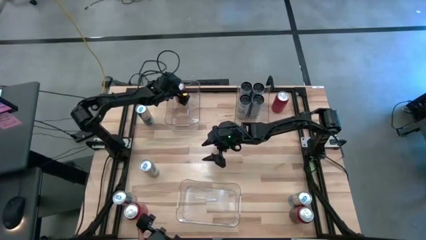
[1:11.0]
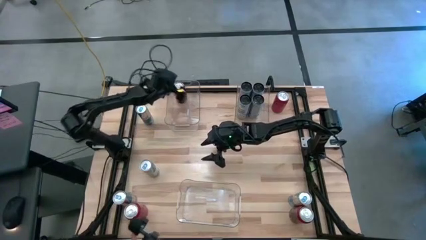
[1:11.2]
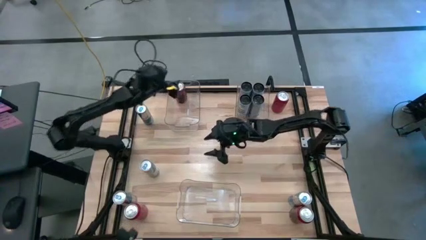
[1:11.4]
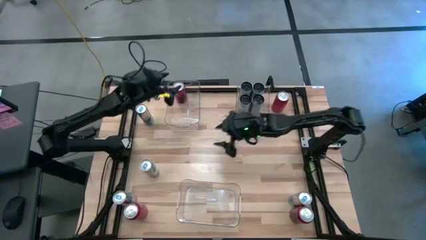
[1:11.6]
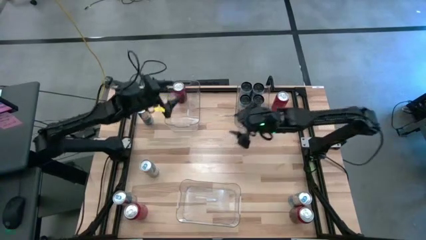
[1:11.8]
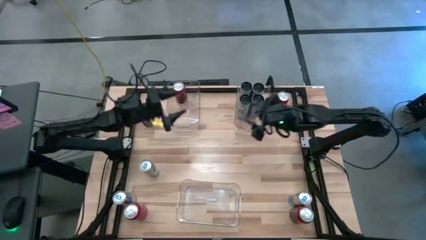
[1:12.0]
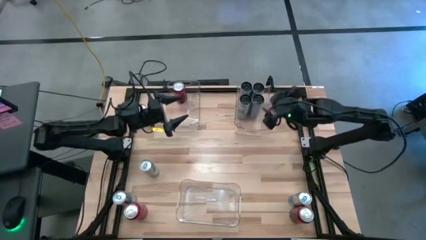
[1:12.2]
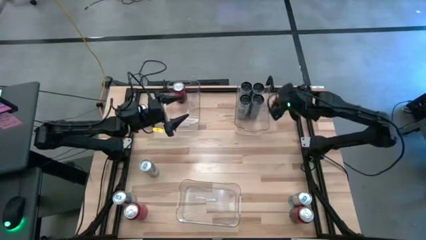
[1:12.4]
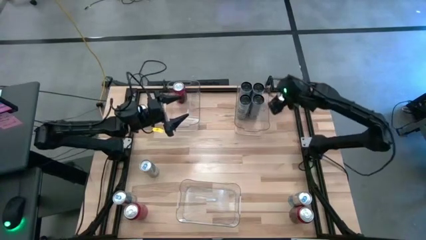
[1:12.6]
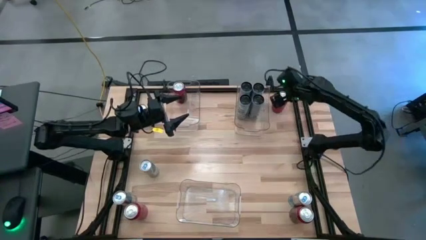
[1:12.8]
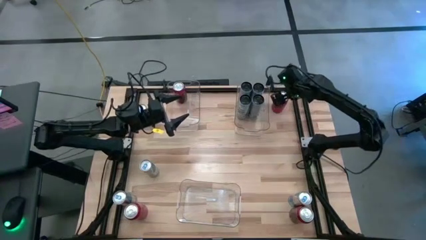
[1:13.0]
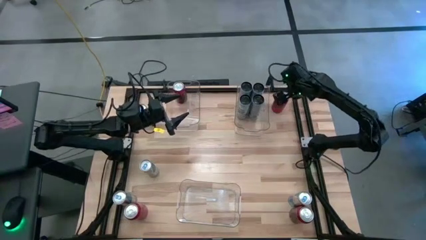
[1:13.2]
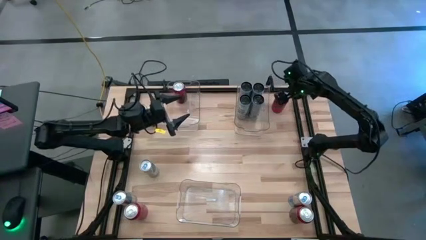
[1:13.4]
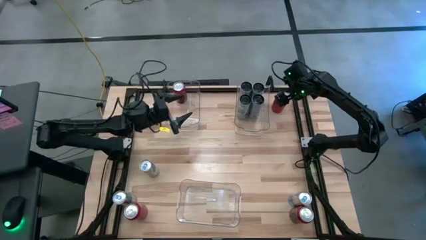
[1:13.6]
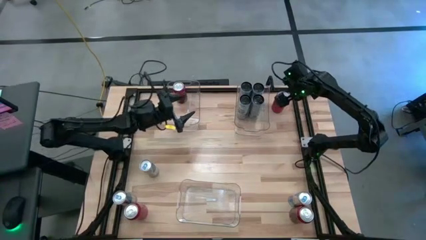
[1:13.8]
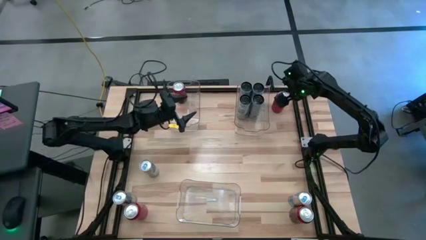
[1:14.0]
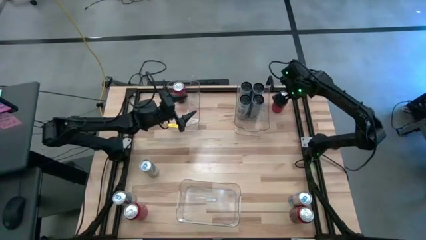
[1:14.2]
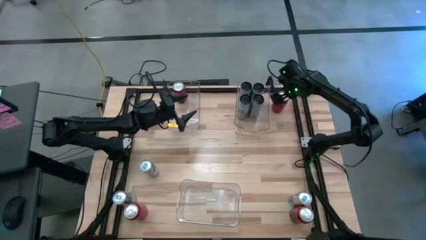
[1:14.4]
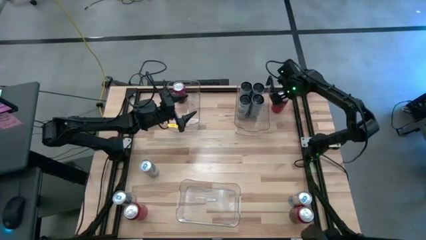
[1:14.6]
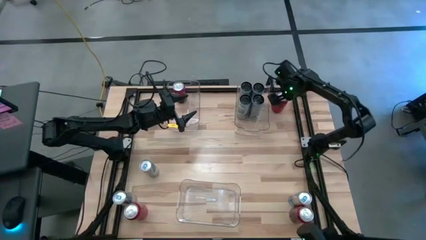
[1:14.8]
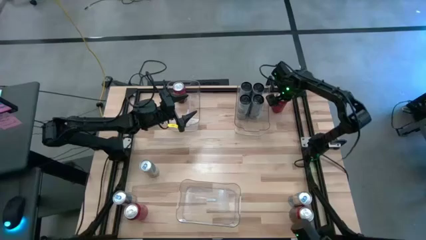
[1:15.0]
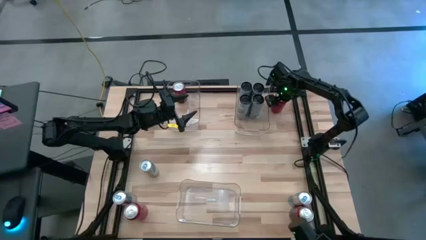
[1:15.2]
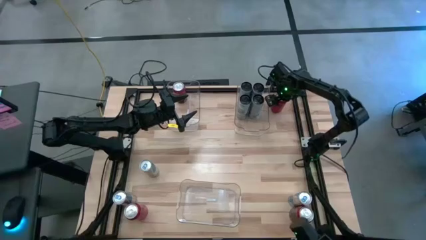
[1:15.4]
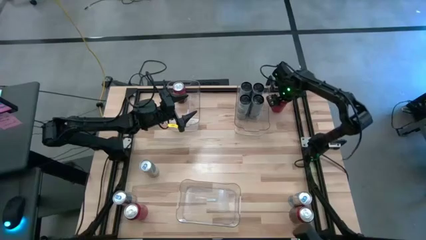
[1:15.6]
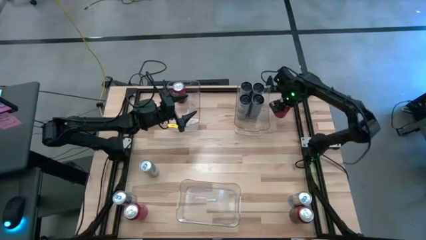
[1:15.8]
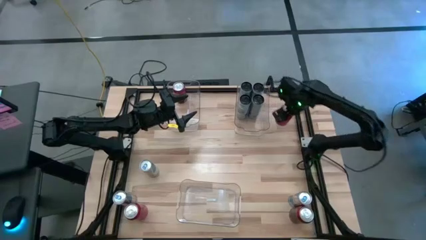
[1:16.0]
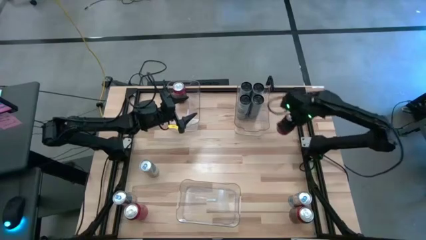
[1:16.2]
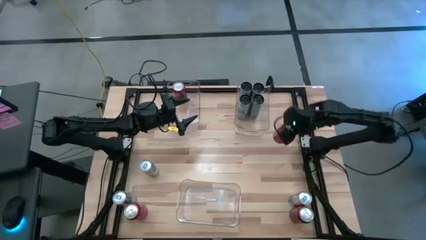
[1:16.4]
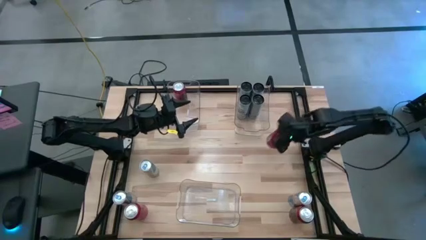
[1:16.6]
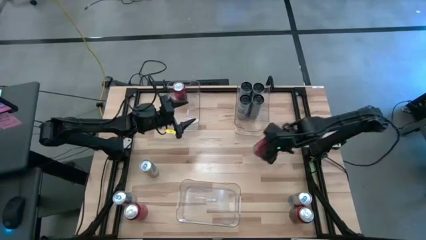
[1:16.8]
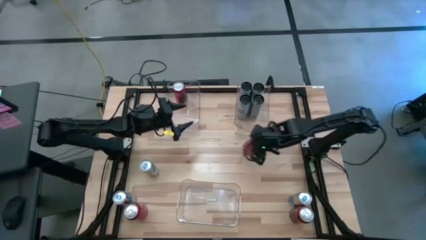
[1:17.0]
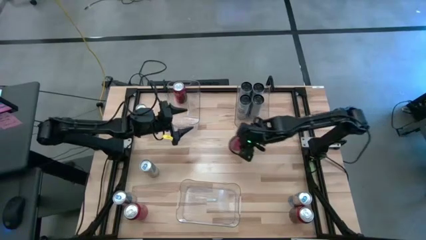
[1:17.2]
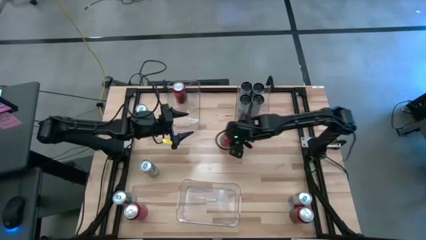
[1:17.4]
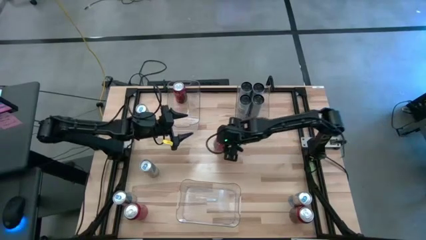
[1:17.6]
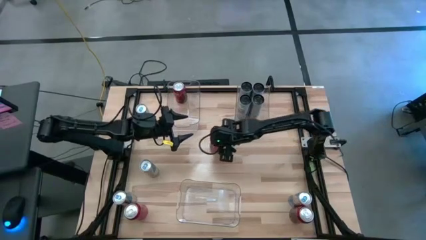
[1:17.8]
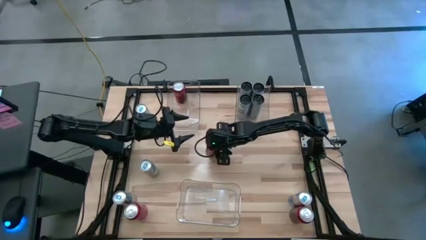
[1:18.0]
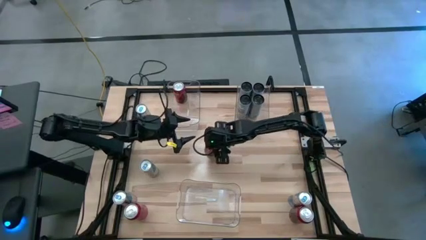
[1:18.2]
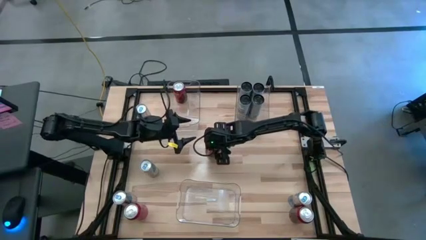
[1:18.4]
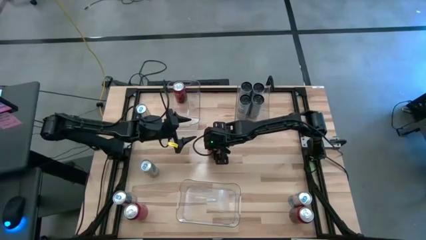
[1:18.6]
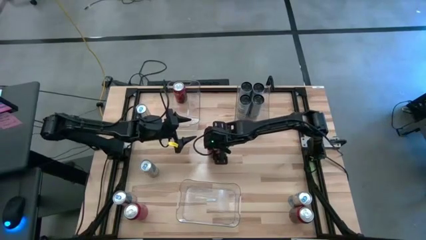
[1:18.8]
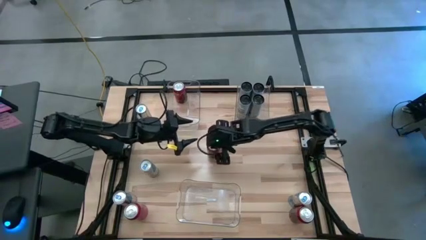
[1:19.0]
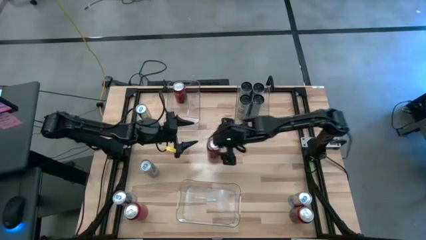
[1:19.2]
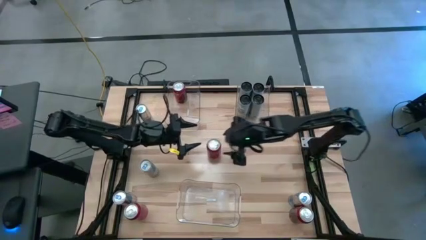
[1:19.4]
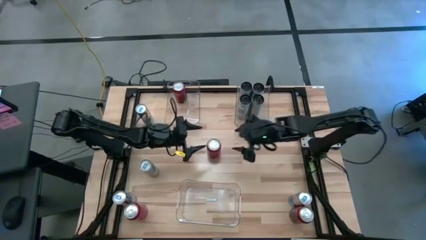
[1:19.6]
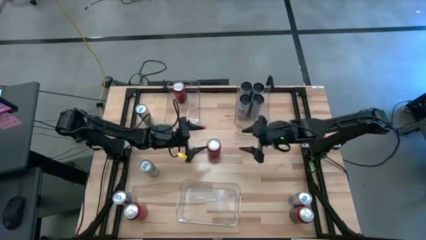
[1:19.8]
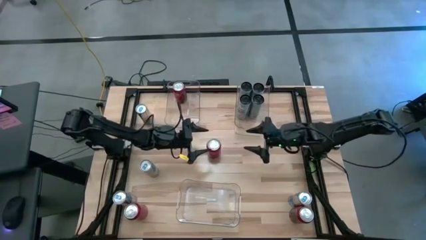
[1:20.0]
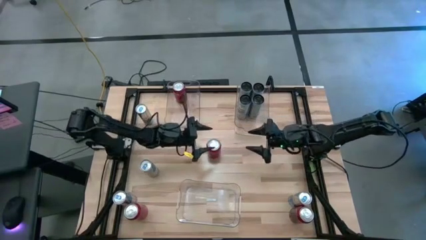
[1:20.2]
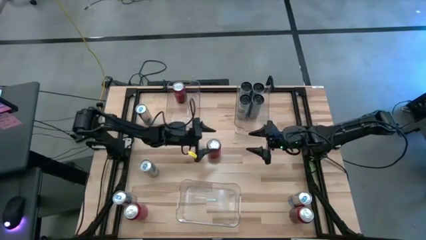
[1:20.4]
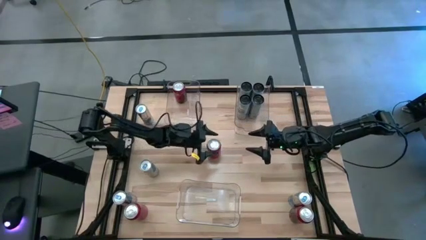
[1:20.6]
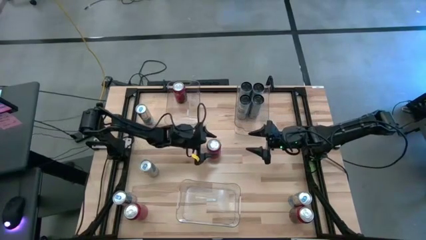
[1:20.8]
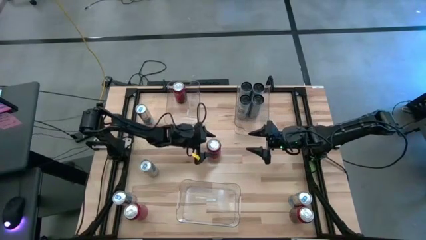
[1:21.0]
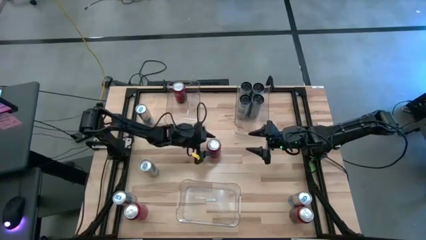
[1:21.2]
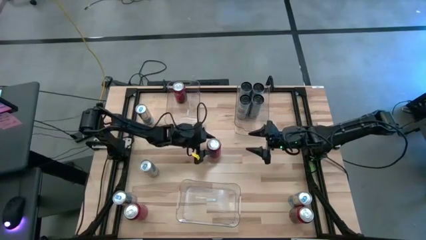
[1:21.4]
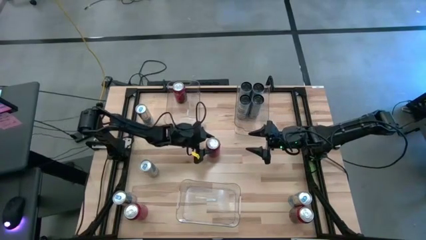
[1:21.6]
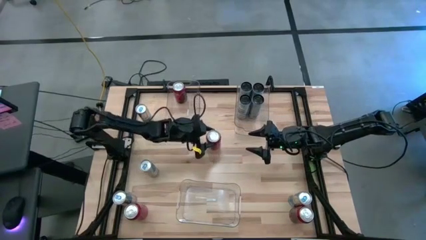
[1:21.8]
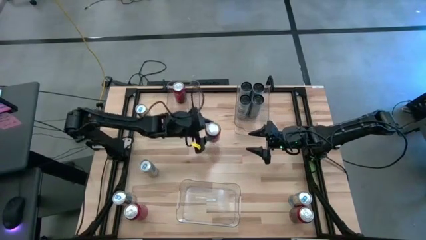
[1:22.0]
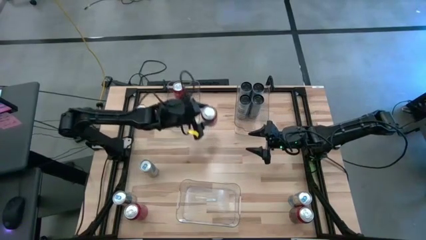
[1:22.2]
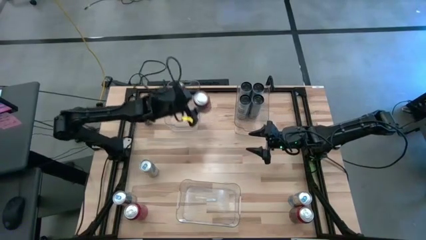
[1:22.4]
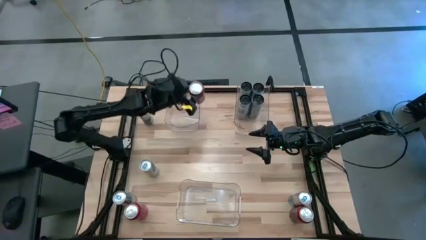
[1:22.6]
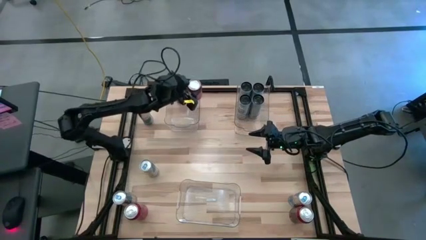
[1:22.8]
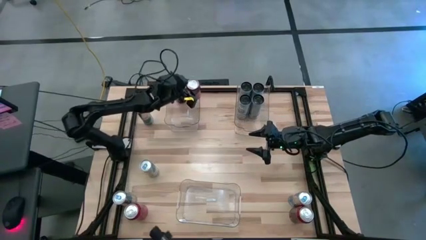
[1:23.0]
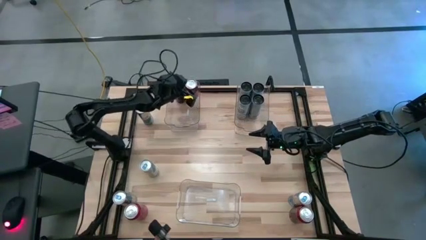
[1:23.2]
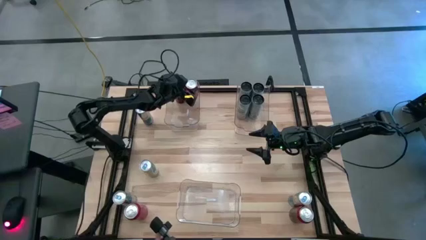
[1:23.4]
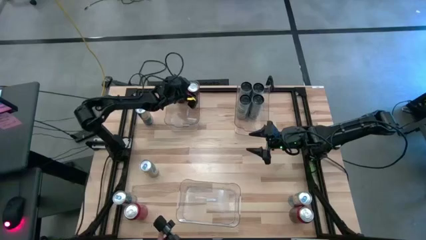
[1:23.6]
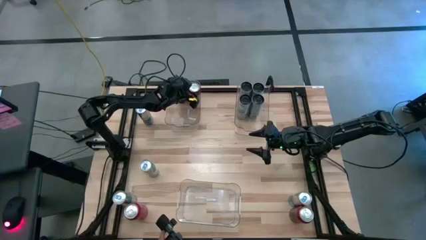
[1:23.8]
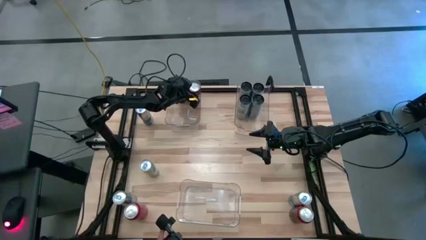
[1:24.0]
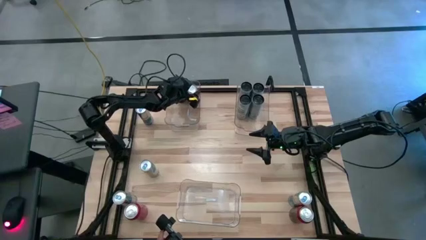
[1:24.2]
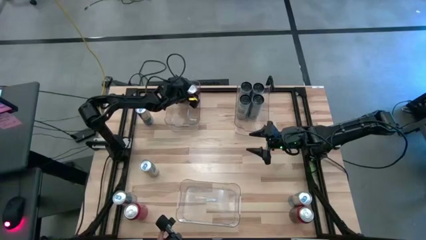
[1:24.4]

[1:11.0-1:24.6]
Task: Sort soda cans
Put the top left red soda can into the top left transparent bin
